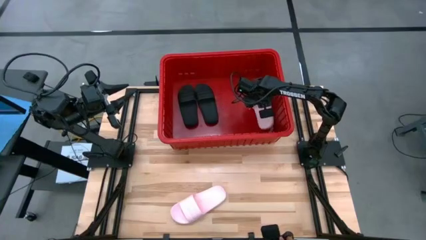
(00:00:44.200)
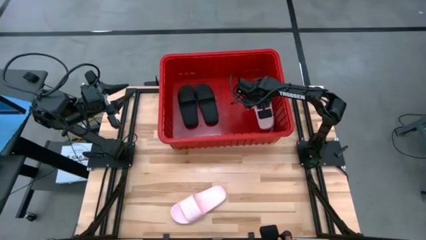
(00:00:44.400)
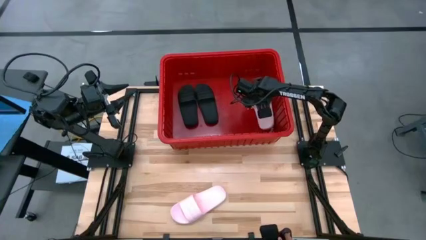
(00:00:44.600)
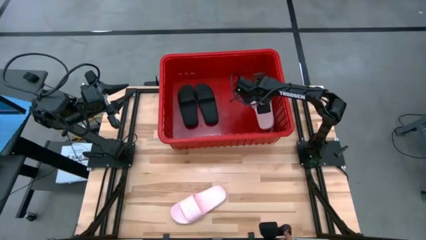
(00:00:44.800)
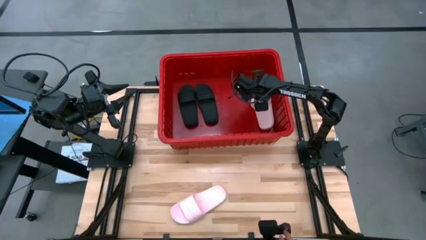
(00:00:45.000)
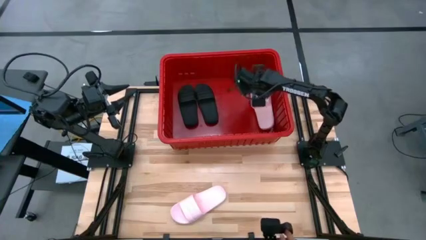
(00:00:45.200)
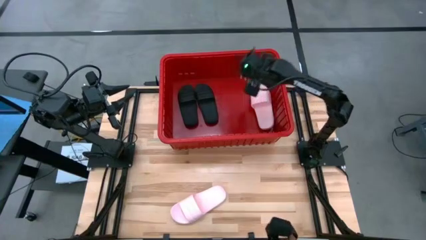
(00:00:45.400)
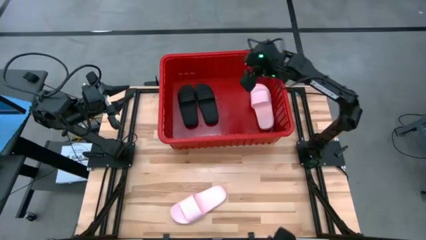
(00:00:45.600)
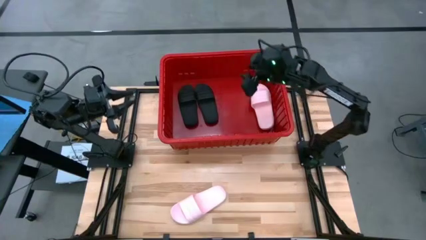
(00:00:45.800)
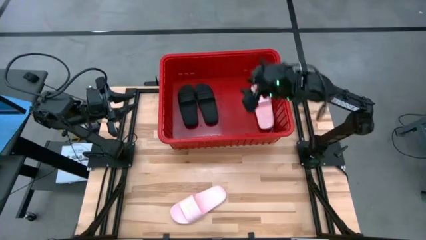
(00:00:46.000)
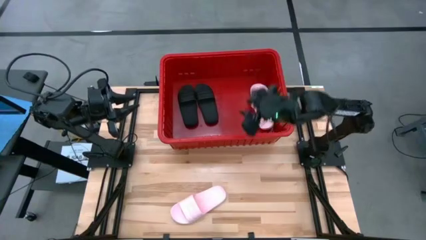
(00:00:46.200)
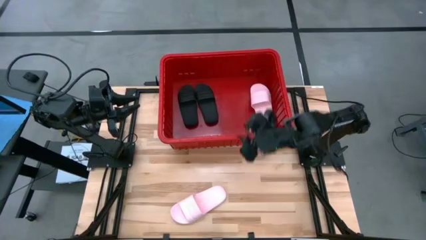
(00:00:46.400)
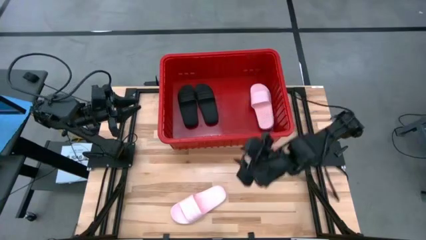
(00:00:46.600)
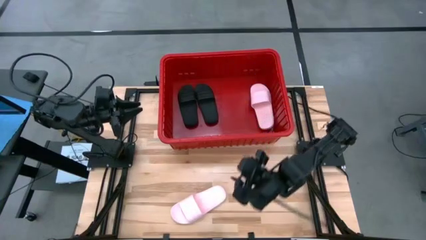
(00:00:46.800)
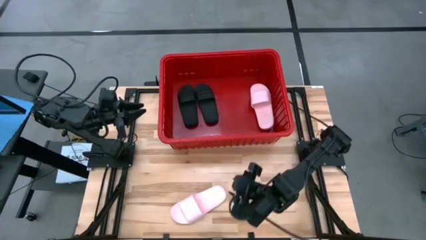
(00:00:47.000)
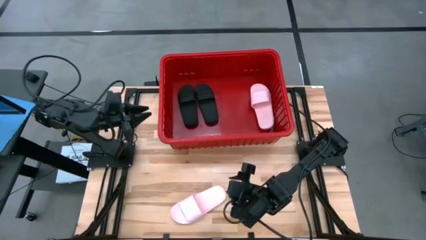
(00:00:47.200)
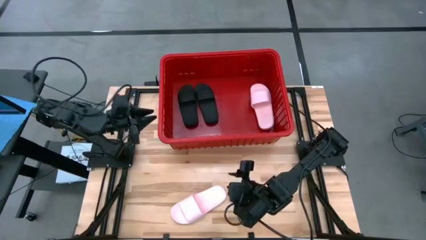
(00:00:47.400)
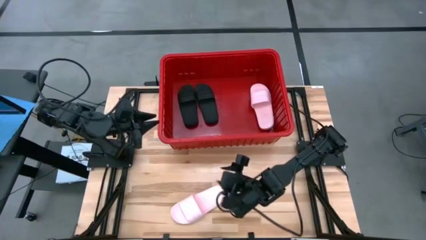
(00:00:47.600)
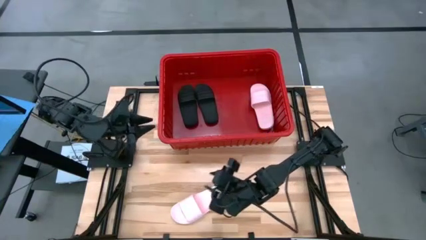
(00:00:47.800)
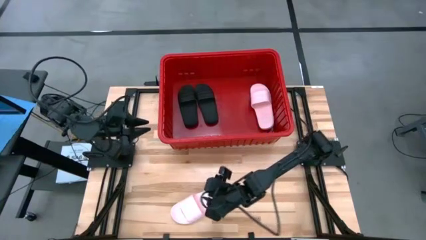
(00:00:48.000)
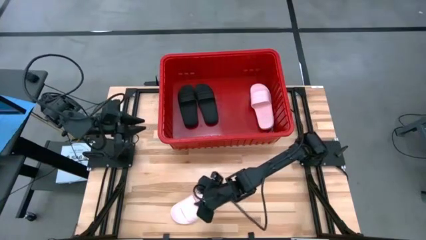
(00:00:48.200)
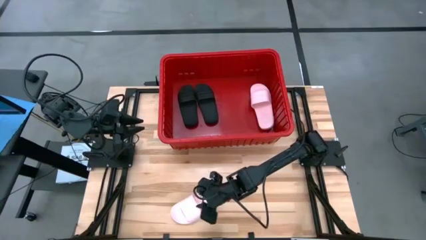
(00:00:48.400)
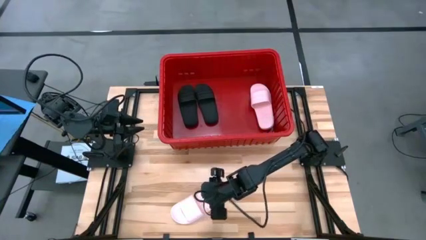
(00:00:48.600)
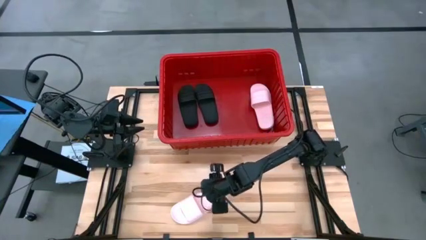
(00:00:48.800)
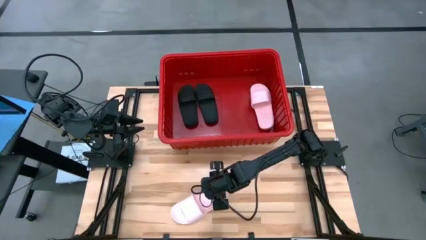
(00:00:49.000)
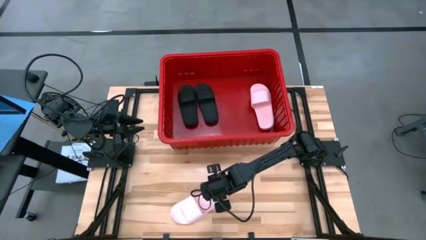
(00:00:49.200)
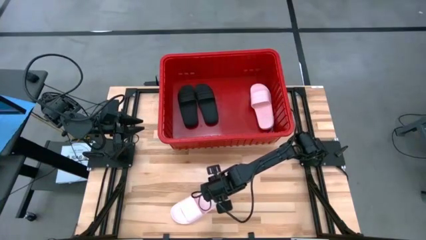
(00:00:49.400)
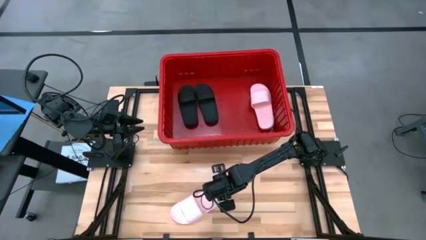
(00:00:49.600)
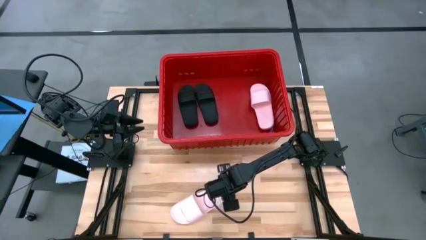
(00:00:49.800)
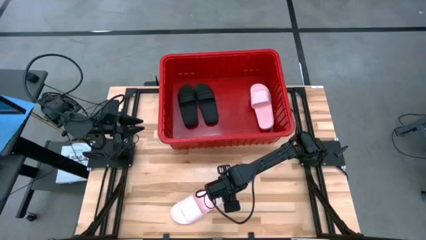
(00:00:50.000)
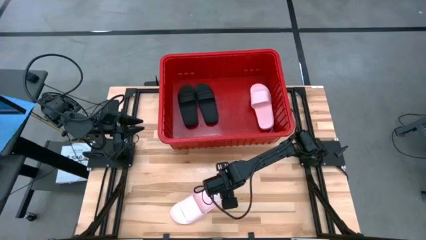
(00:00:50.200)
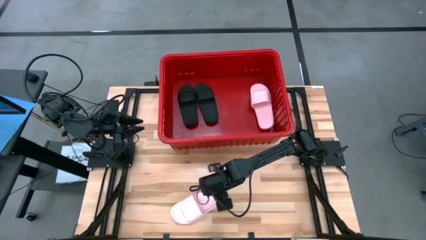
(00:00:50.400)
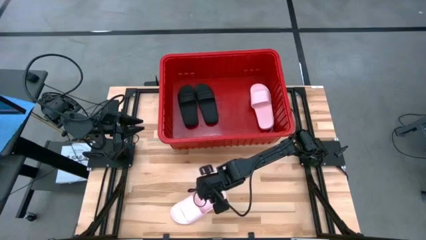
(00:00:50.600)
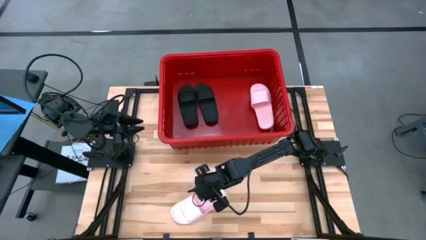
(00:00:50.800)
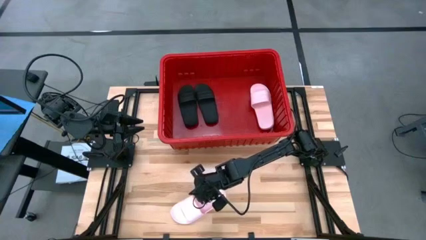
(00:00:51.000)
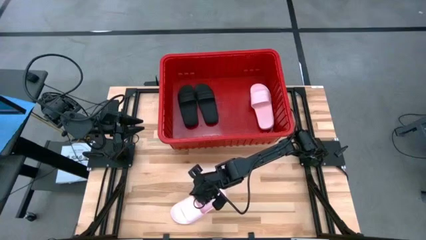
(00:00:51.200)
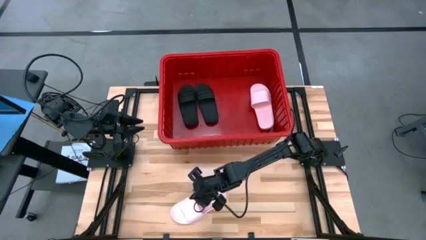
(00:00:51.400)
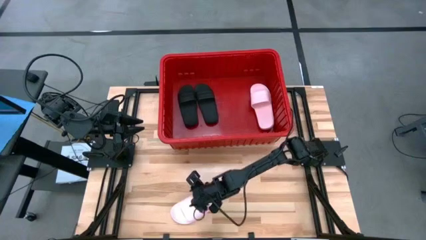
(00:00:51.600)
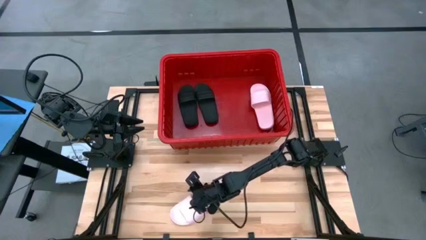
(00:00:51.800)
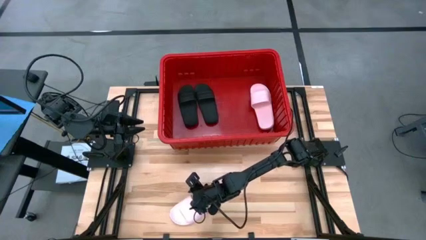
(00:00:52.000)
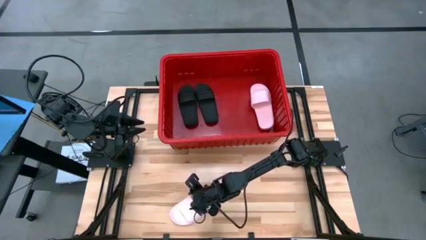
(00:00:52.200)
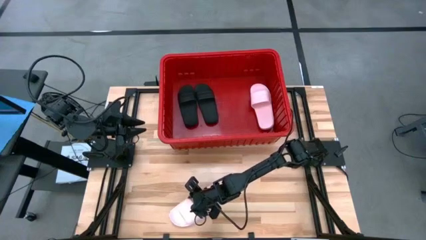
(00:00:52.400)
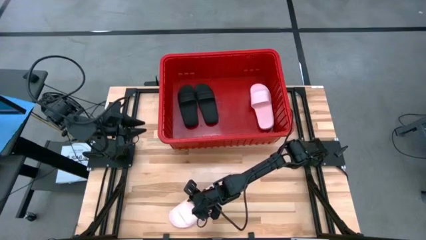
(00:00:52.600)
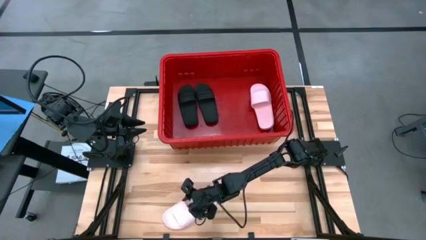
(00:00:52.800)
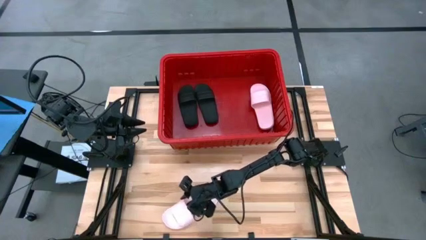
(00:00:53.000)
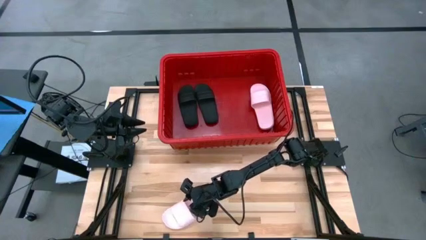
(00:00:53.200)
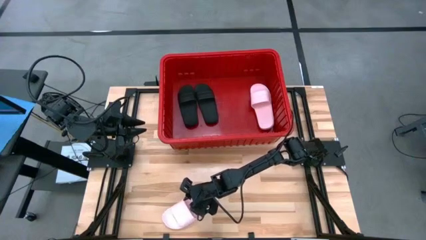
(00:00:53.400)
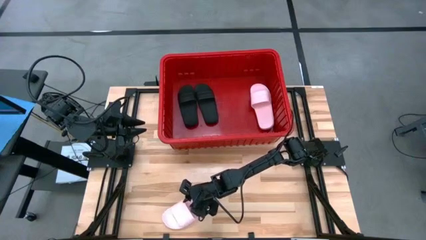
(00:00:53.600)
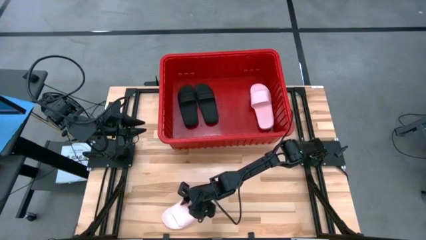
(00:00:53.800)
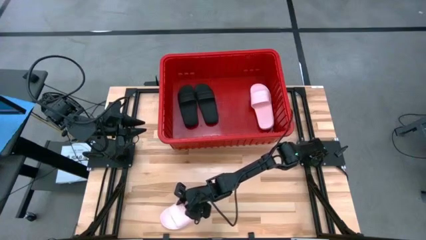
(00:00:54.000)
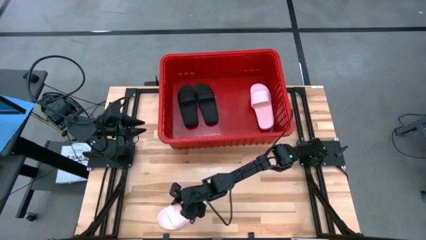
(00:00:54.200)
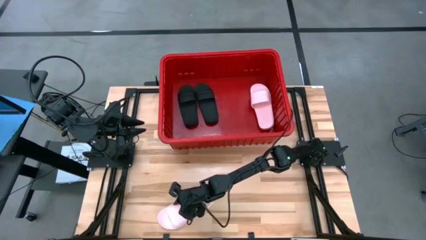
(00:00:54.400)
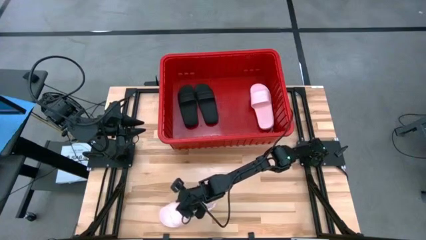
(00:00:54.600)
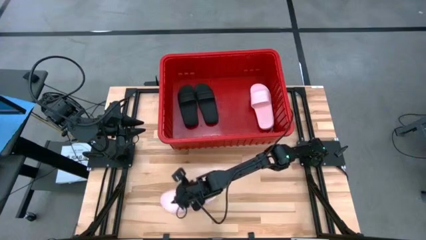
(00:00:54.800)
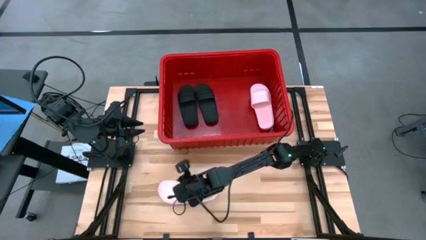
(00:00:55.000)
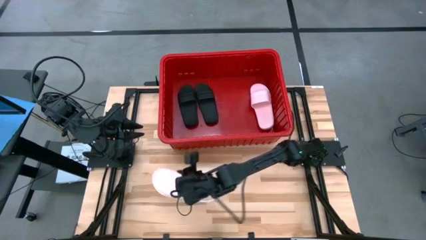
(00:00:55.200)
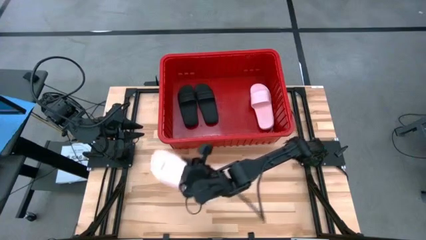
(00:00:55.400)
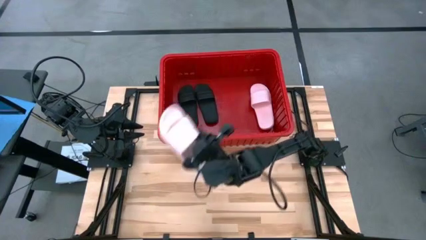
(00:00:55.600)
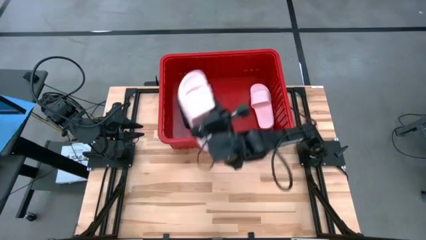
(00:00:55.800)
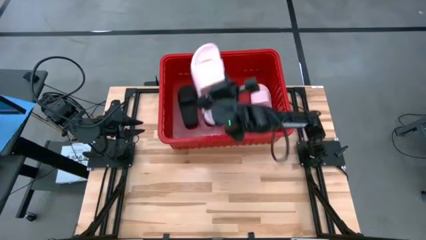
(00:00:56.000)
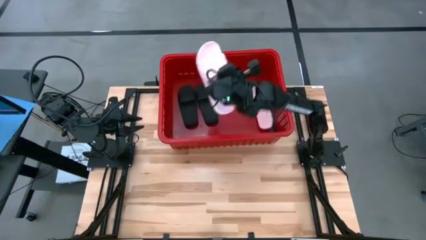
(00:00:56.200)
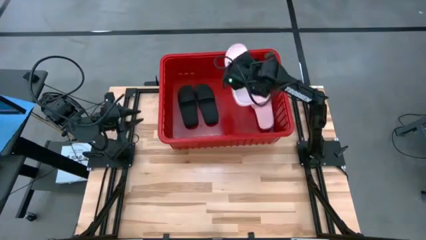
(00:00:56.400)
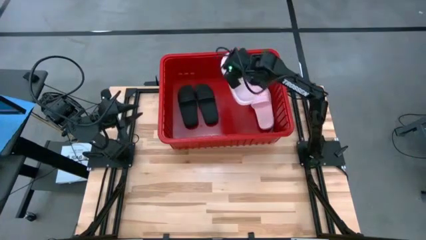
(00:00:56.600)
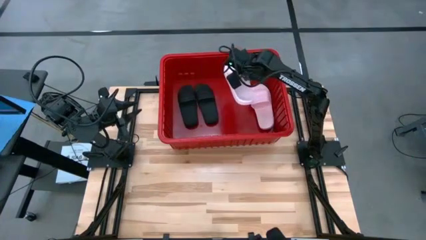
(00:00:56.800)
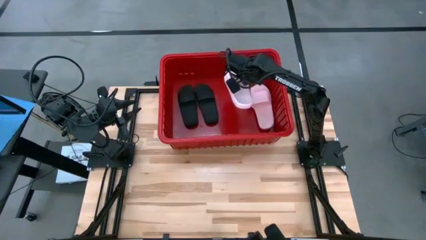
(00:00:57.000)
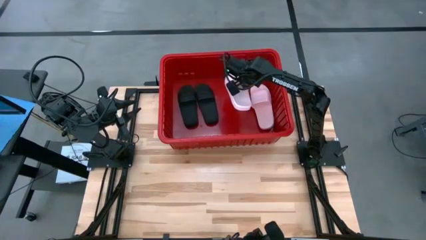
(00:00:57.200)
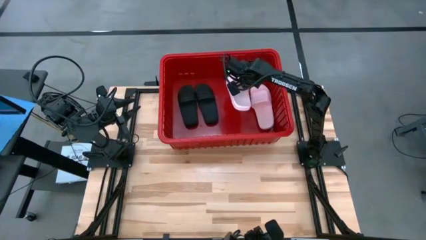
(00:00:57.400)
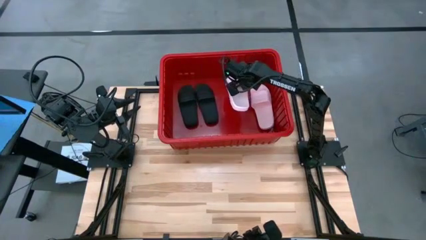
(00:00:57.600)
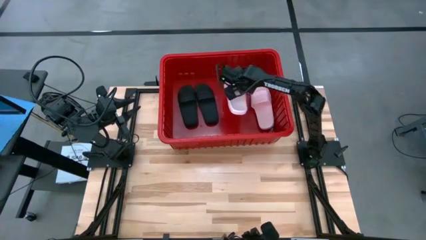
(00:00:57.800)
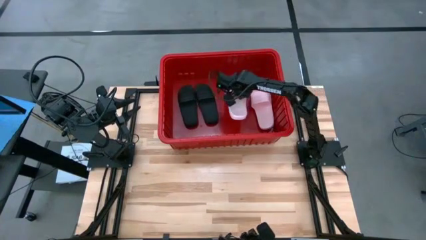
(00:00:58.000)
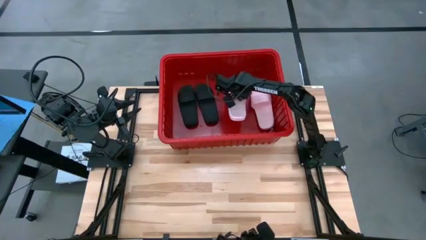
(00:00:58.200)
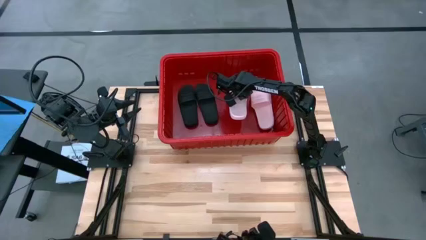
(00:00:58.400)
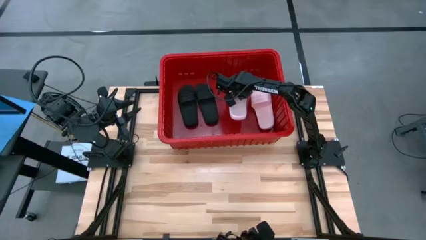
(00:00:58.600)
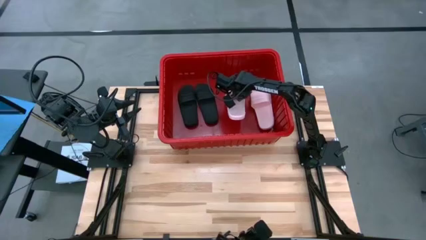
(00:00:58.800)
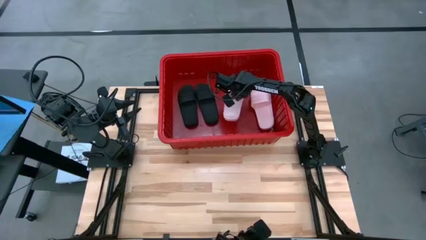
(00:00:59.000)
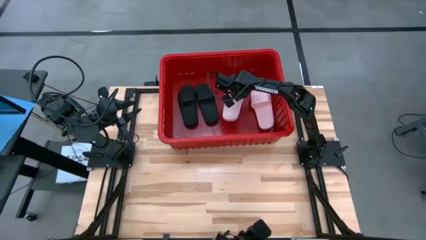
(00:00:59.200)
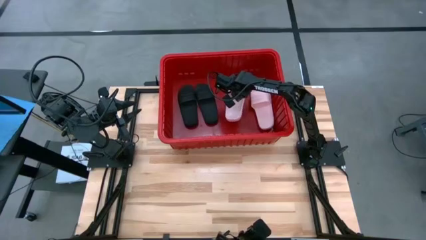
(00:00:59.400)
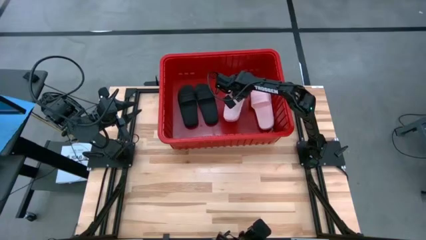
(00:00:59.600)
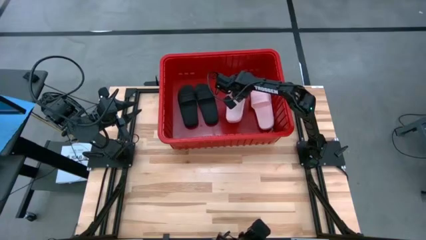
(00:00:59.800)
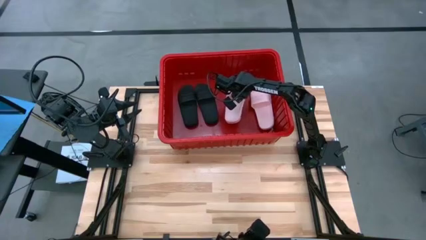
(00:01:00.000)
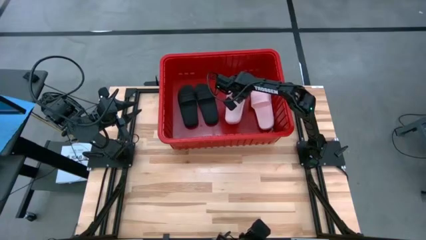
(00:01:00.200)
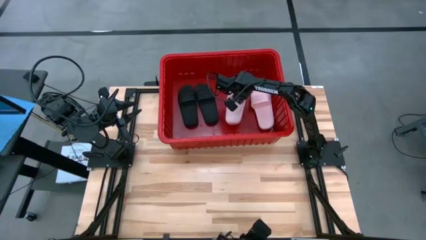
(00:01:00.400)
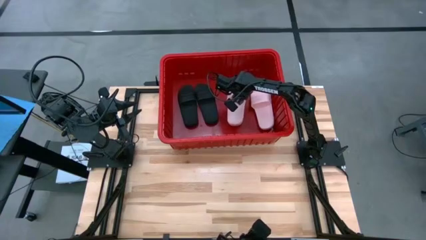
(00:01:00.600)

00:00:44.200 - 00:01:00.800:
Task: Pick and place slides into bin
Put the pink slide into the basket
